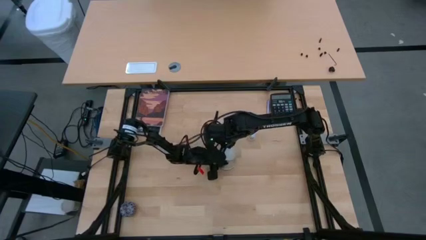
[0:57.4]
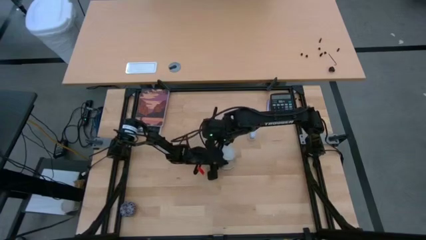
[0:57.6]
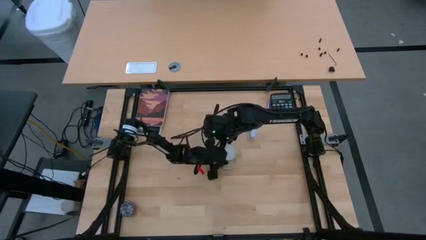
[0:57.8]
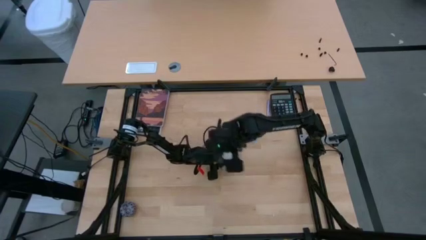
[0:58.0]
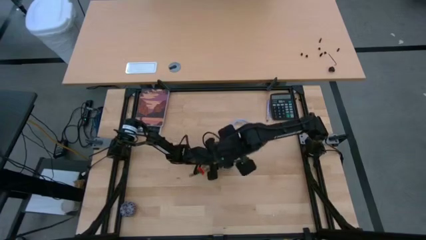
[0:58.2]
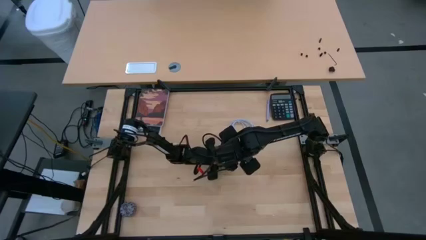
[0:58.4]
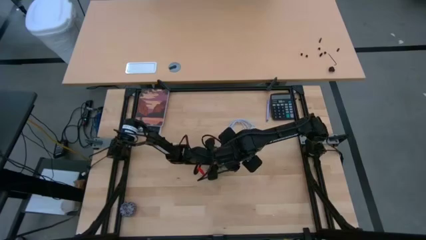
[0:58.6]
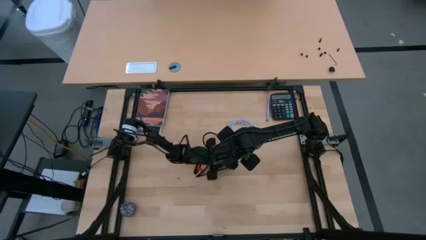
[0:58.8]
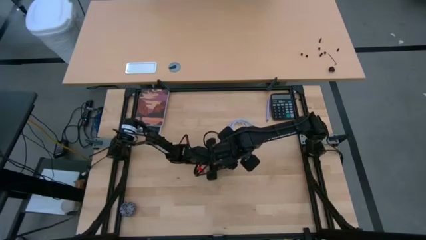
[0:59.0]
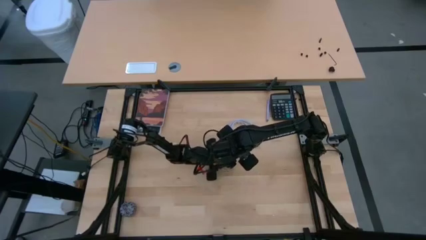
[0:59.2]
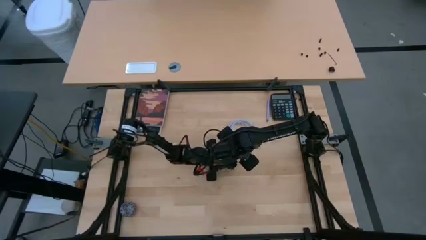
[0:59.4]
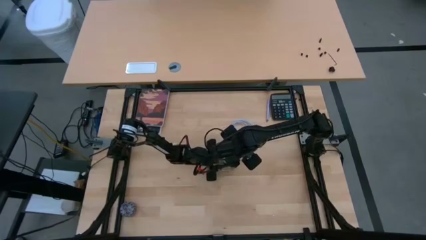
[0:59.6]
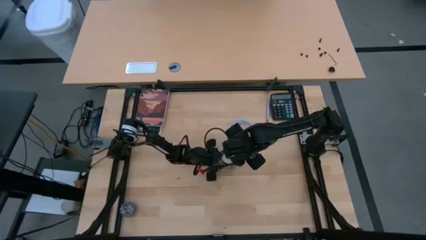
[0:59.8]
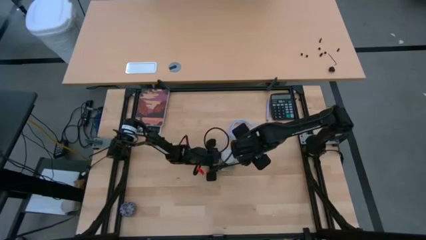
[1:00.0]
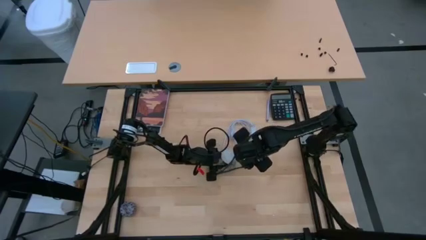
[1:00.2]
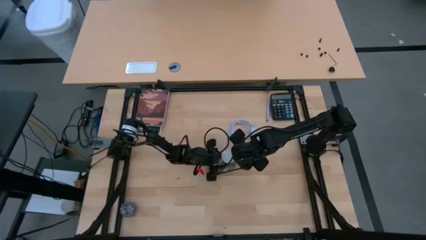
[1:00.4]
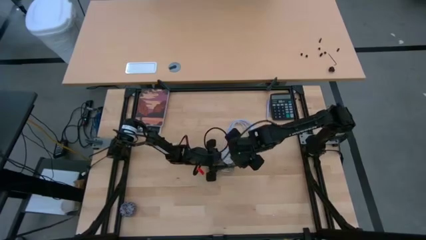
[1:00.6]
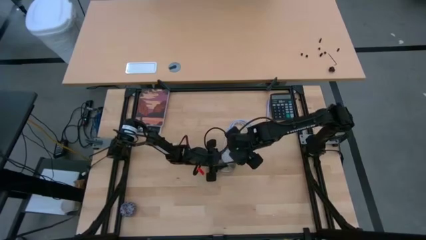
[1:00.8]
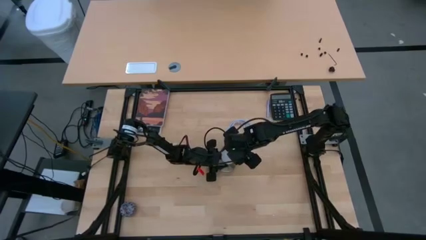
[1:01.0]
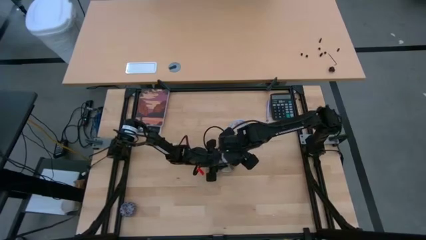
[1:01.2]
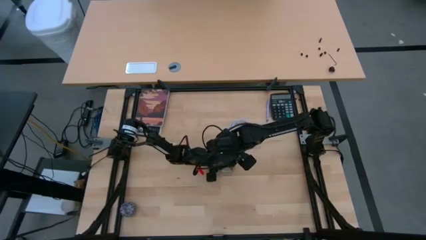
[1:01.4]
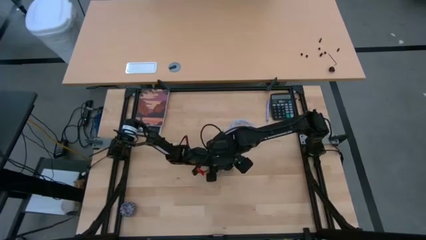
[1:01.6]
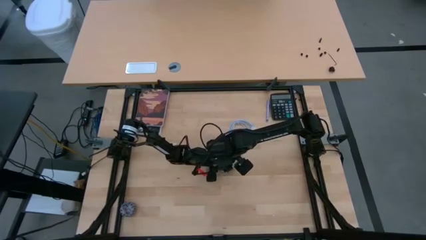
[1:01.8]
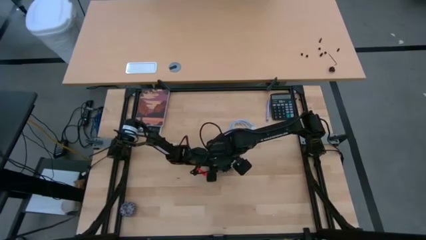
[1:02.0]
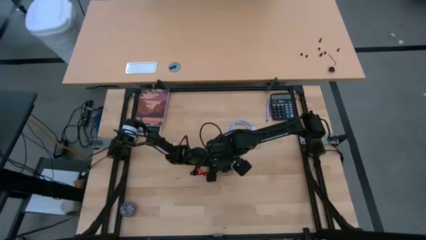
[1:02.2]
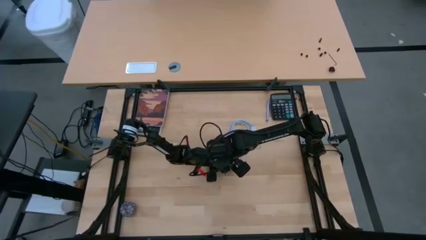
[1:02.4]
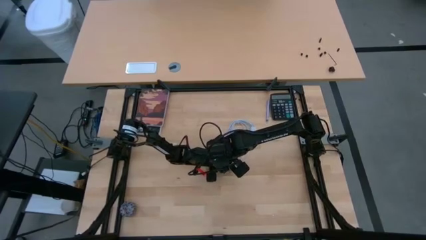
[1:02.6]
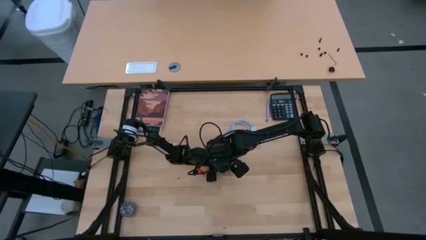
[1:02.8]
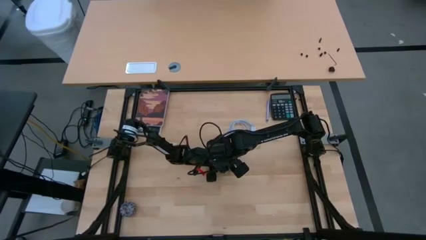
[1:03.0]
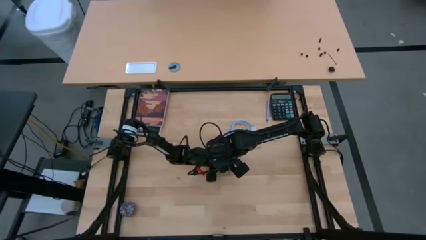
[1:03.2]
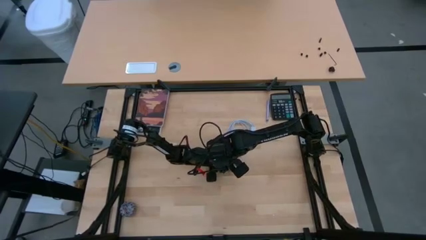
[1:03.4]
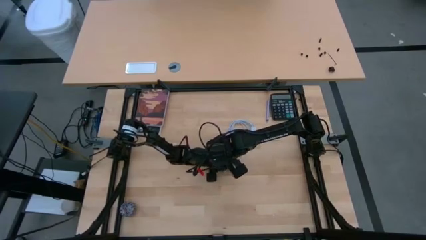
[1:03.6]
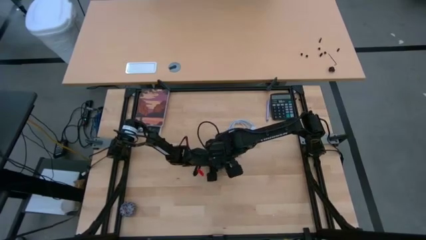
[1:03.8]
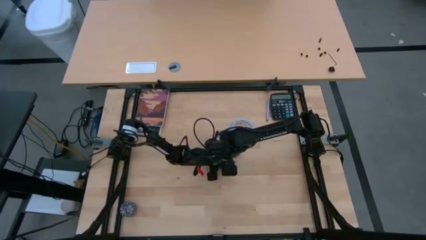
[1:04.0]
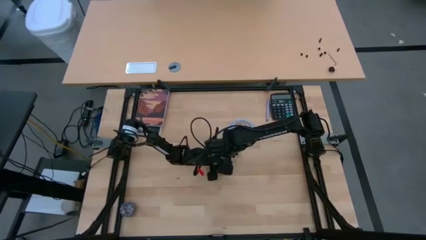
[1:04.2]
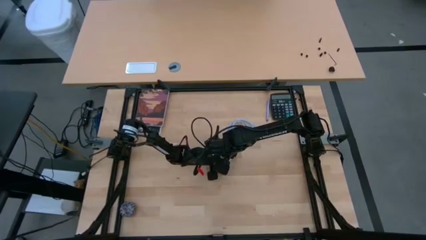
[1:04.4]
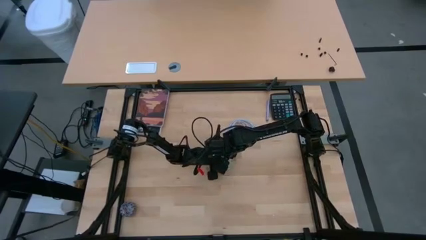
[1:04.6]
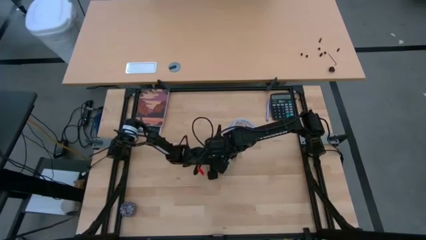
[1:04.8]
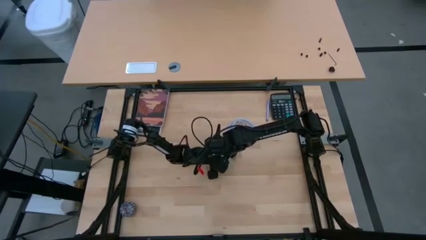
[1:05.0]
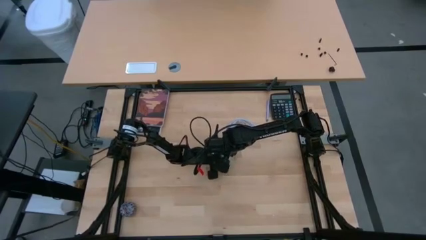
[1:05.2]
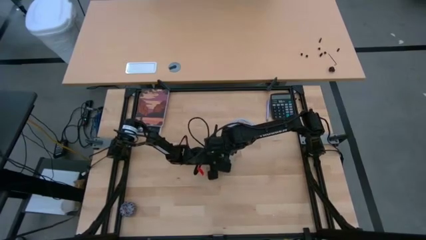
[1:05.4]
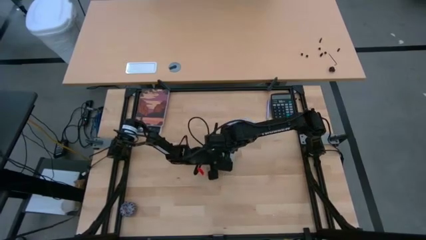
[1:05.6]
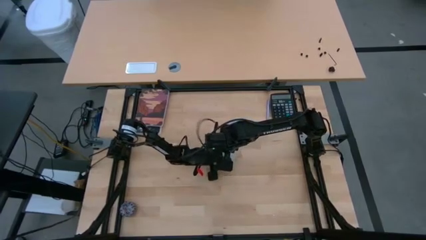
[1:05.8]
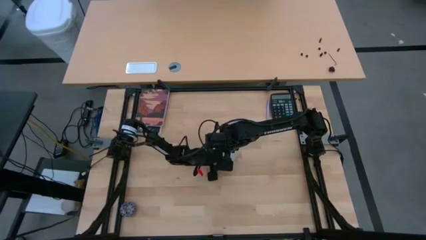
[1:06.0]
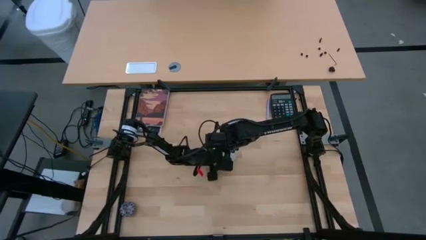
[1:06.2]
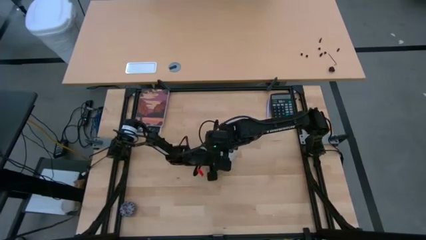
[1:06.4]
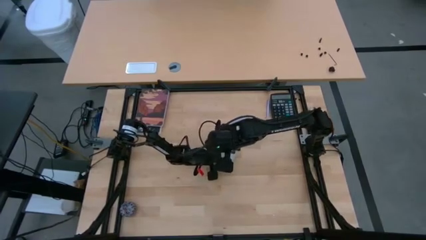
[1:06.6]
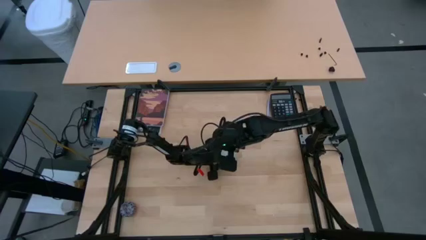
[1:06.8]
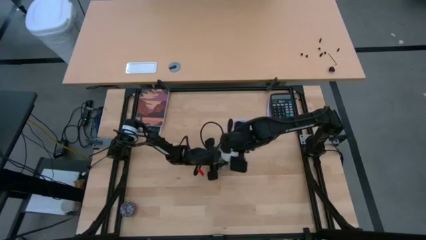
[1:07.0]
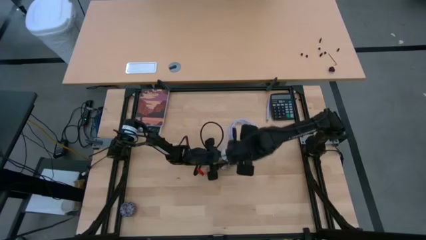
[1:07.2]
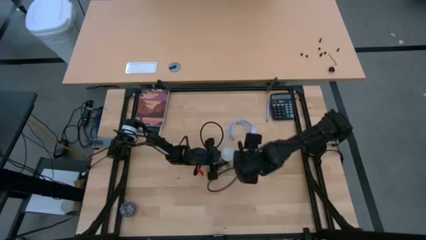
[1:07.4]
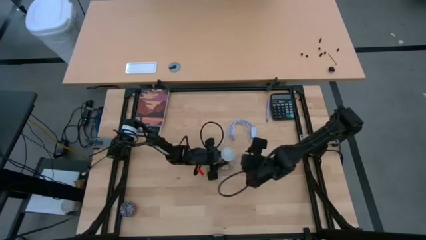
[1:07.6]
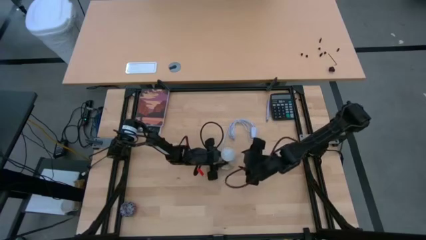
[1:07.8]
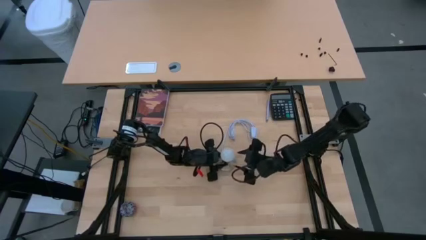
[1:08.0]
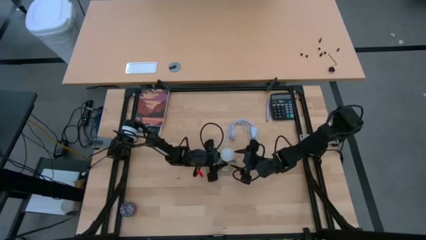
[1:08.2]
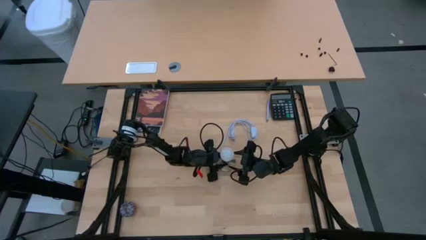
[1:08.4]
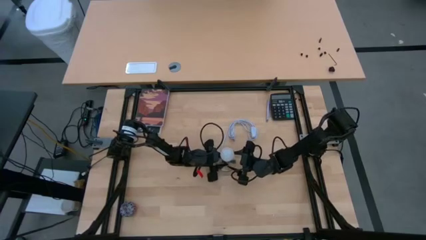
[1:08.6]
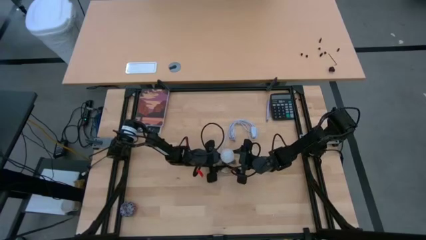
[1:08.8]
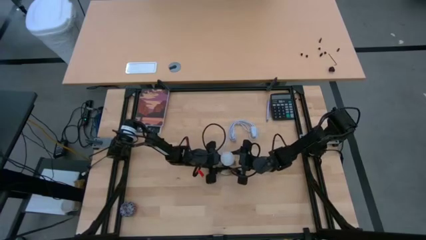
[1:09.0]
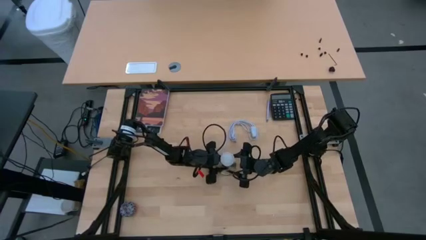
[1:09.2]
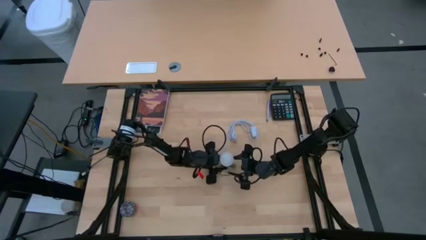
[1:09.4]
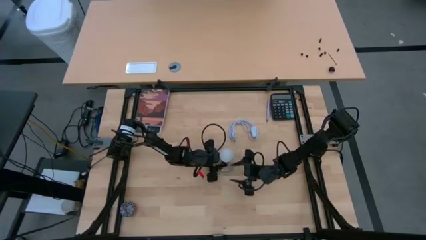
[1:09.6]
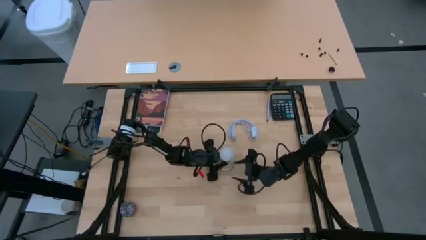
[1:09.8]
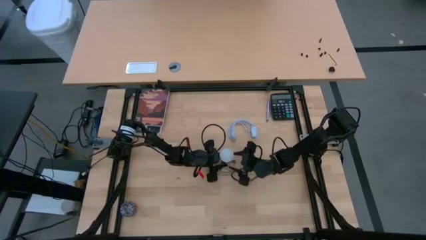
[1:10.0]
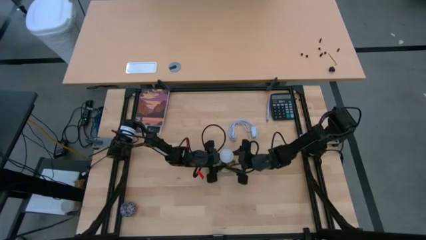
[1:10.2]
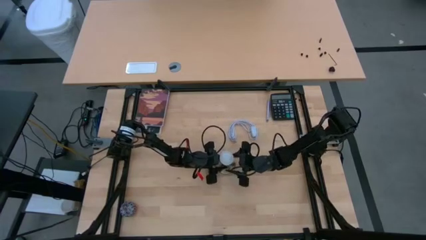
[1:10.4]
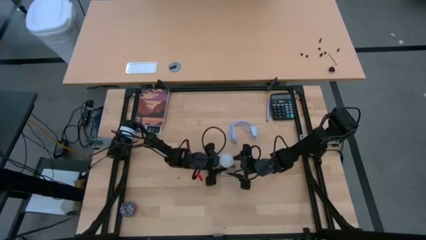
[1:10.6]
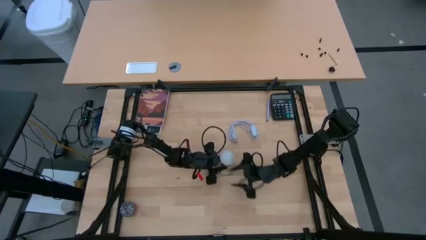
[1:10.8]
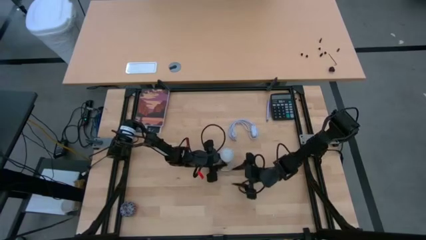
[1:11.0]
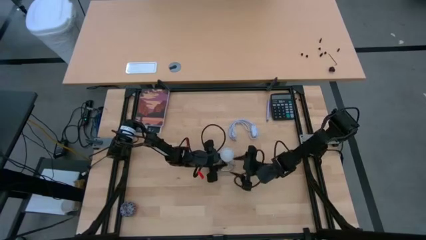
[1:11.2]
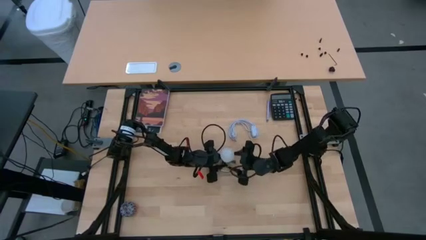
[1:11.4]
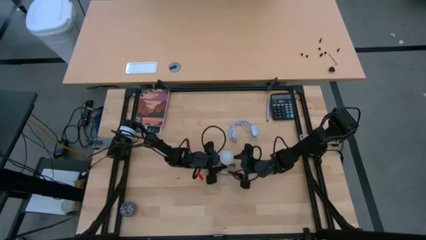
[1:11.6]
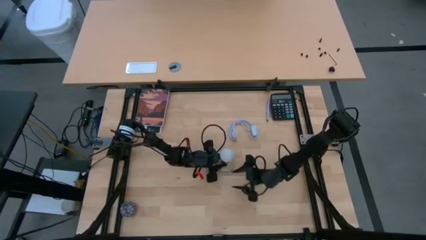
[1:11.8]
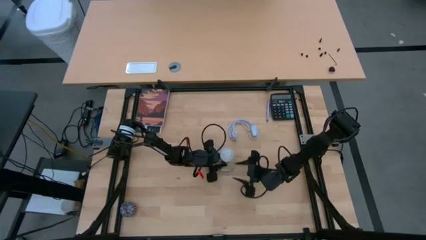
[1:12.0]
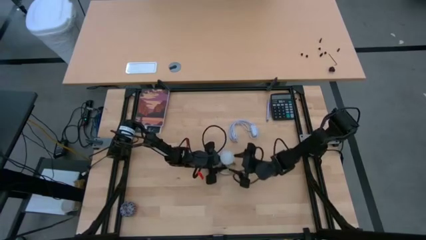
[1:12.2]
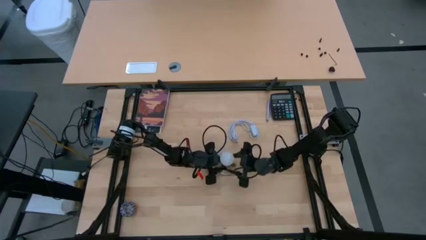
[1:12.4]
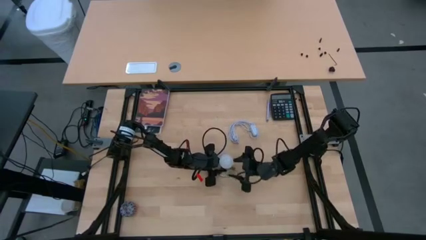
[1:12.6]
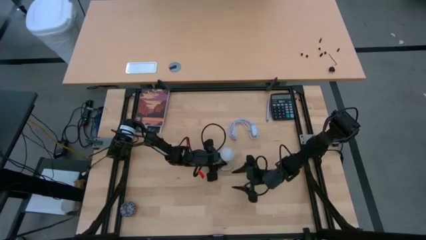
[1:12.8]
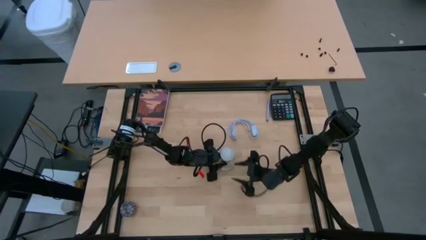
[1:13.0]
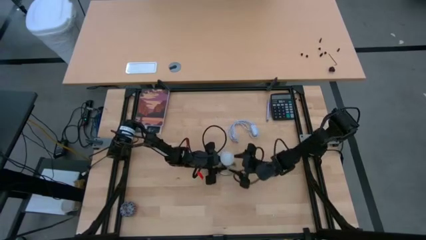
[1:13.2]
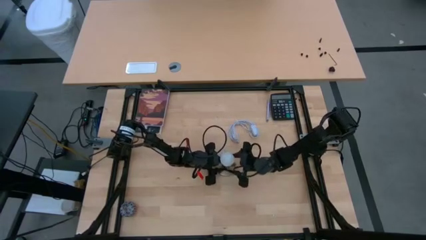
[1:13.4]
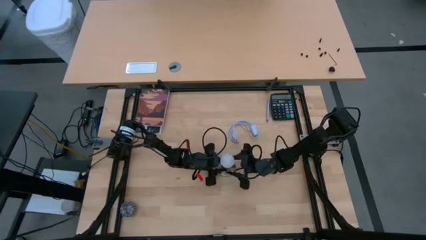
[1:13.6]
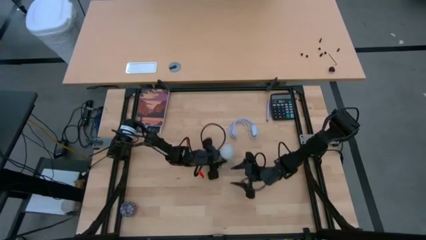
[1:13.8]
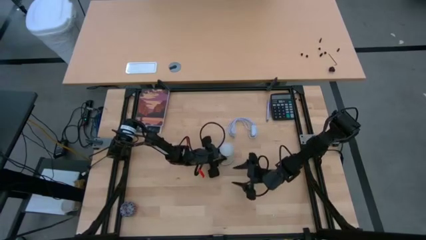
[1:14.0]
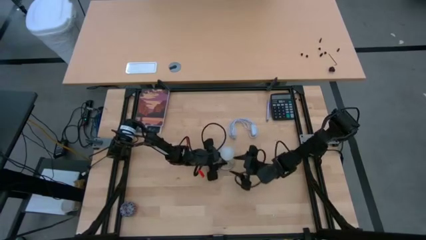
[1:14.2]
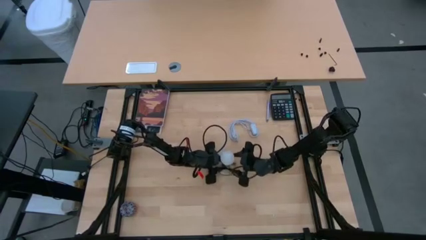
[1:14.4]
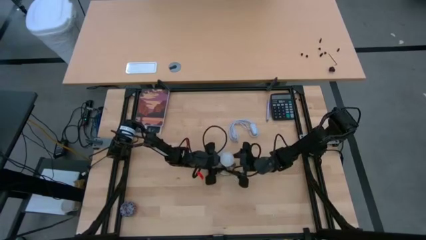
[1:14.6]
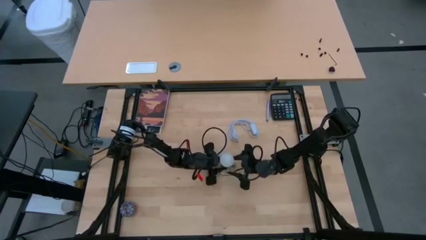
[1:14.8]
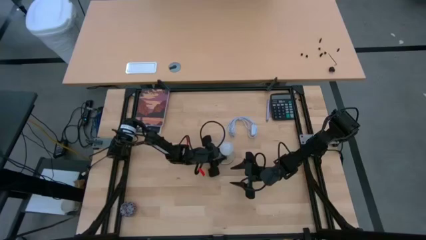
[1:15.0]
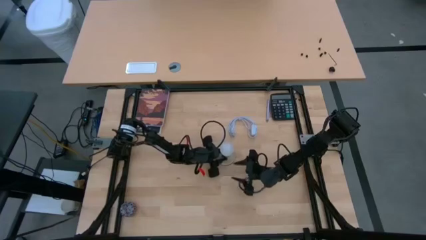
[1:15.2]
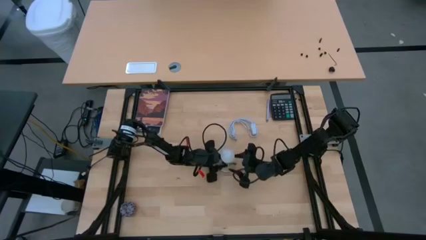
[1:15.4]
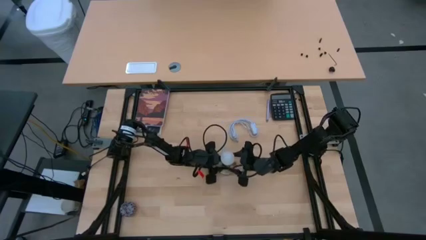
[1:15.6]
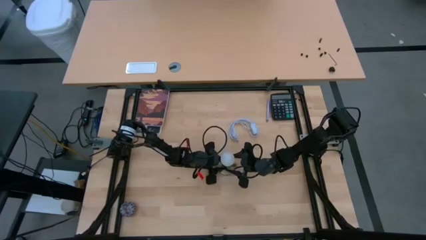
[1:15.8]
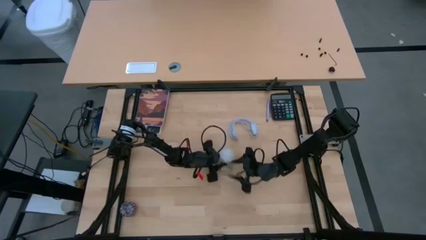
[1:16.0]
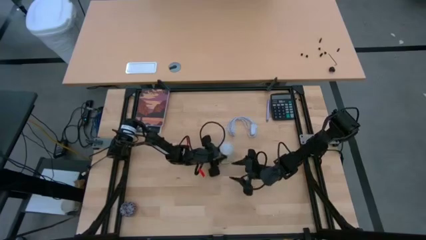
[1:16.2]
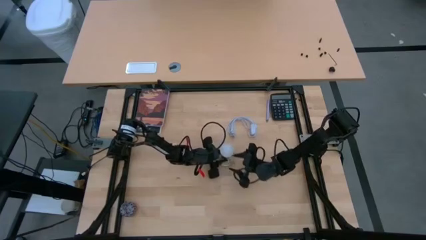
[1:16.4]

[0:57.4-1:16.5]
Task: Screw lightbulb
Insert the lightbulb into the lamp
